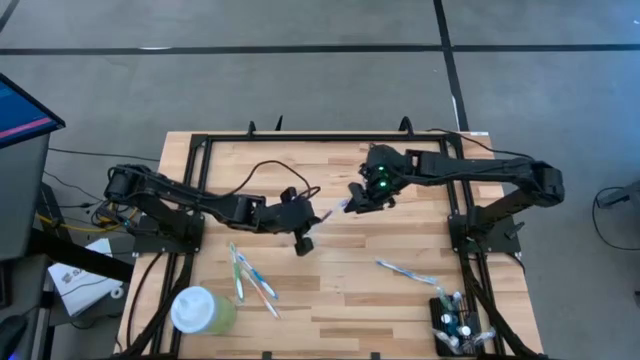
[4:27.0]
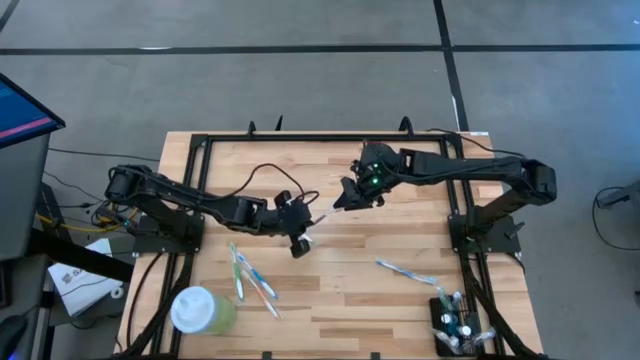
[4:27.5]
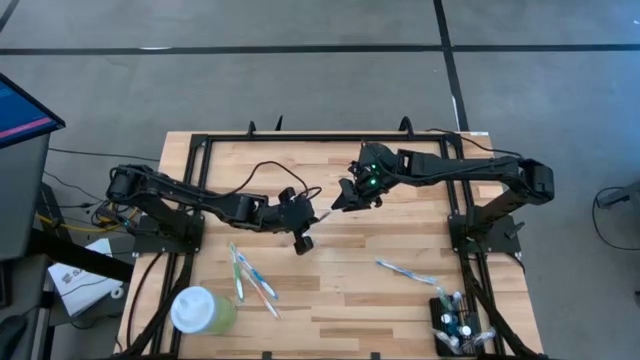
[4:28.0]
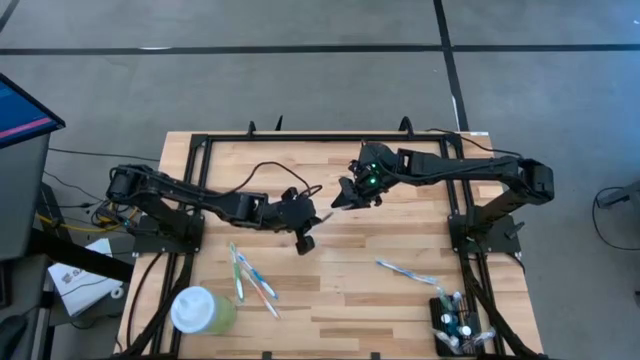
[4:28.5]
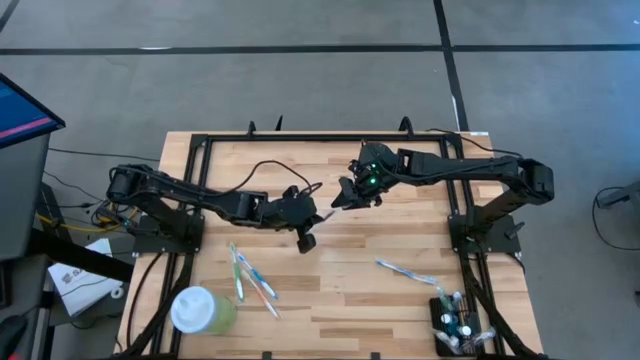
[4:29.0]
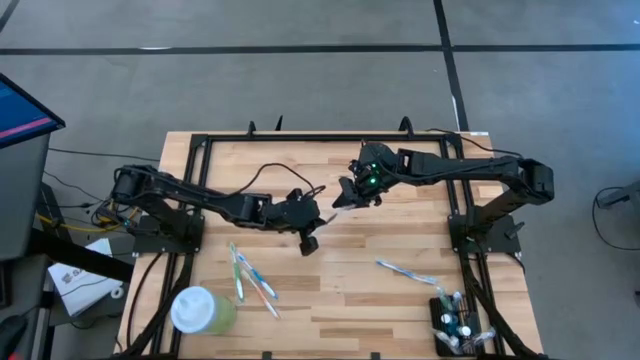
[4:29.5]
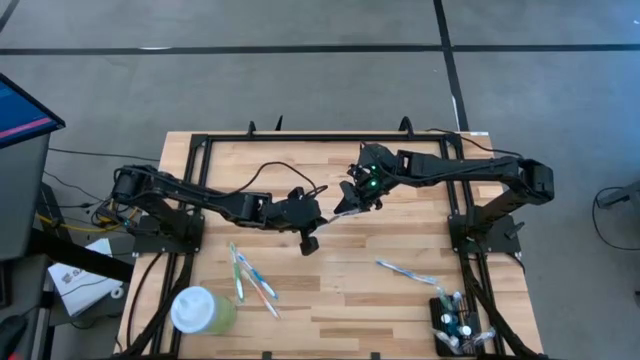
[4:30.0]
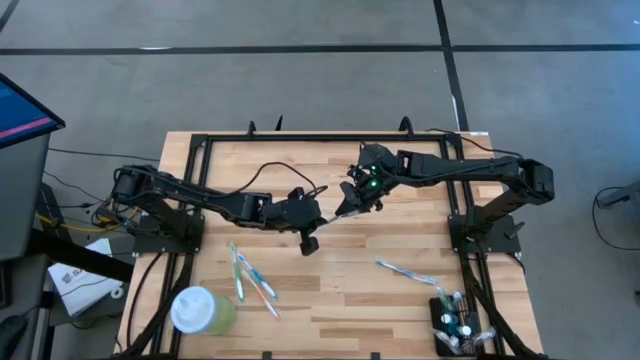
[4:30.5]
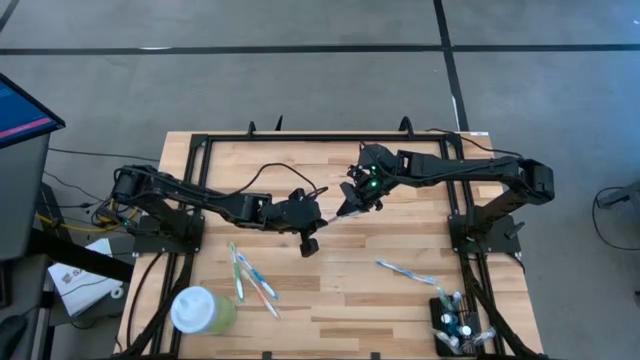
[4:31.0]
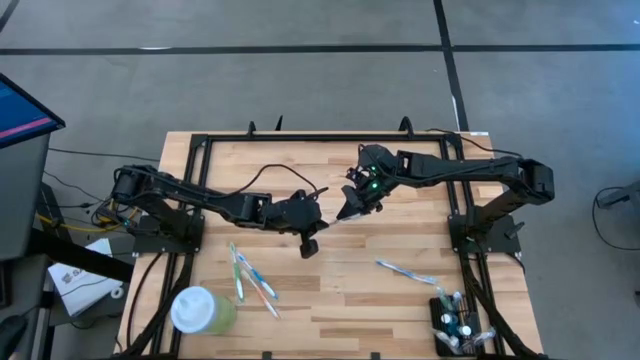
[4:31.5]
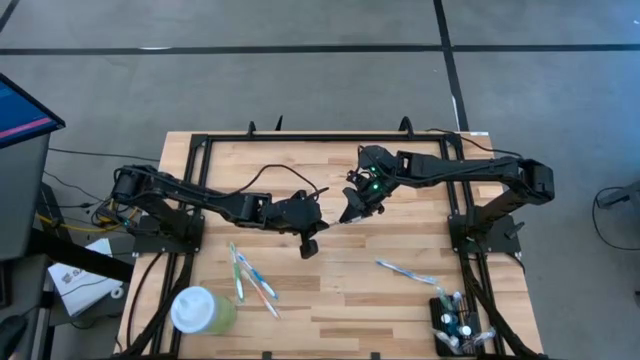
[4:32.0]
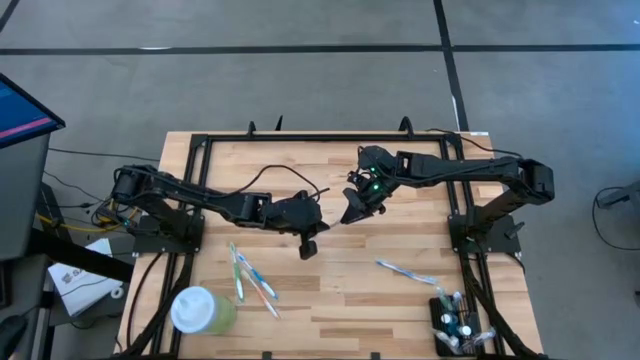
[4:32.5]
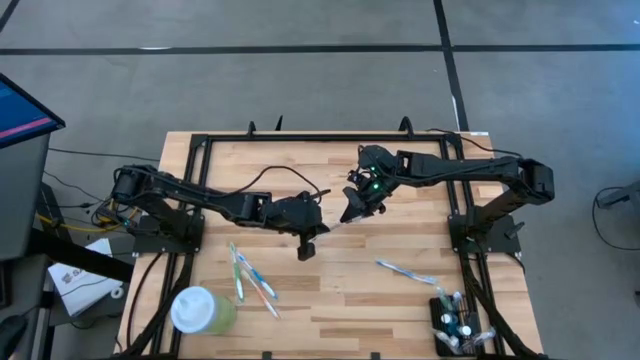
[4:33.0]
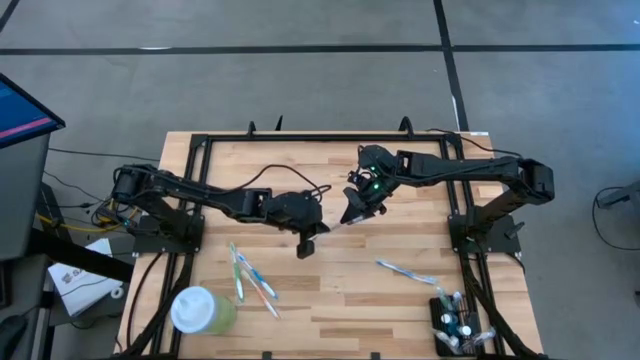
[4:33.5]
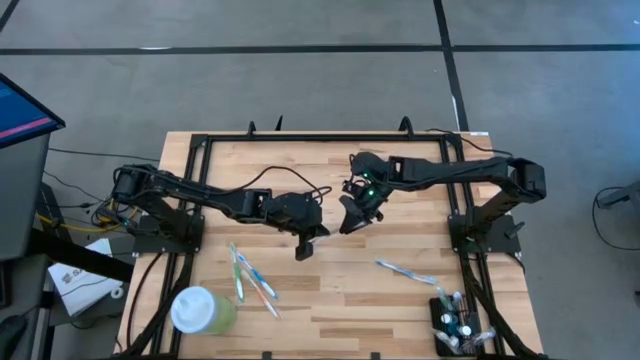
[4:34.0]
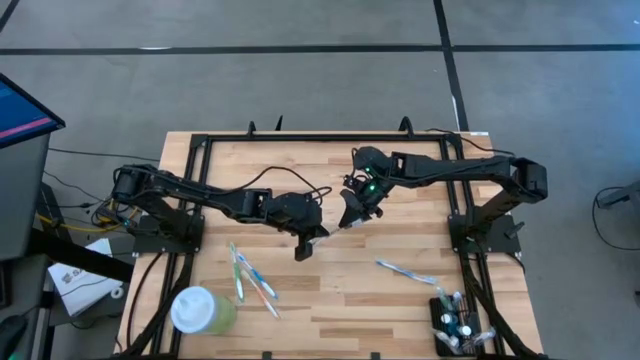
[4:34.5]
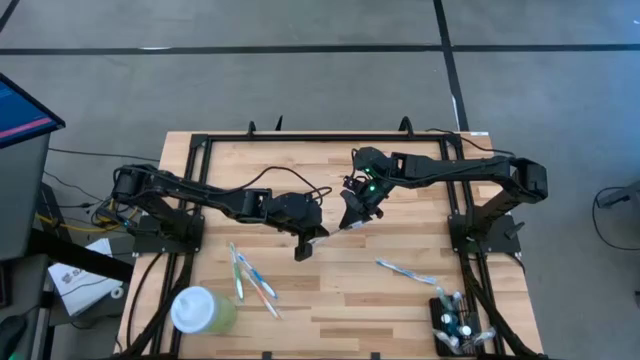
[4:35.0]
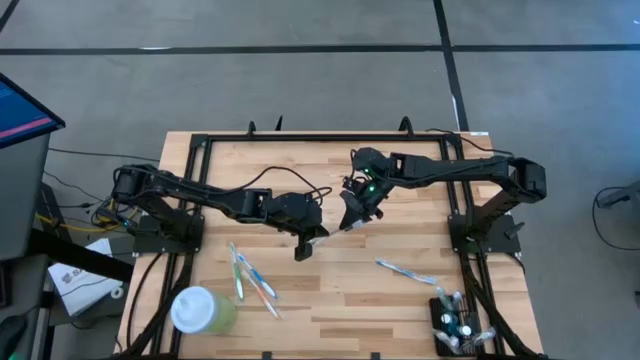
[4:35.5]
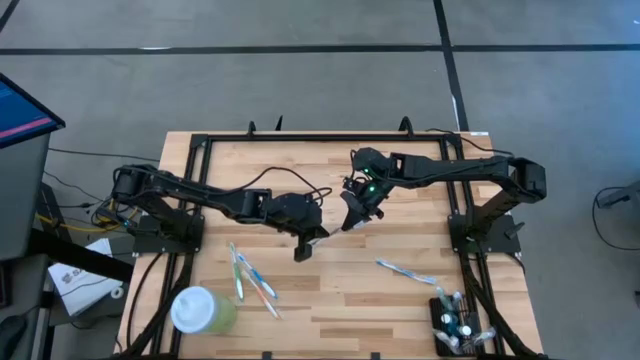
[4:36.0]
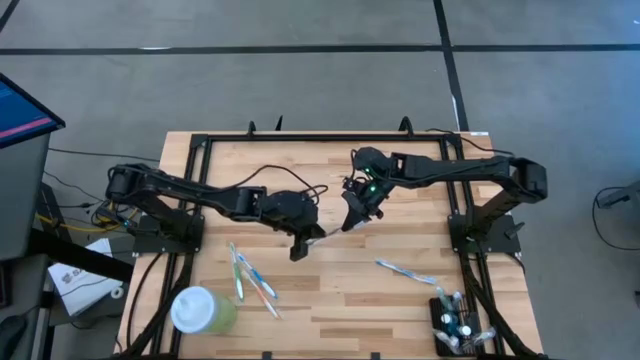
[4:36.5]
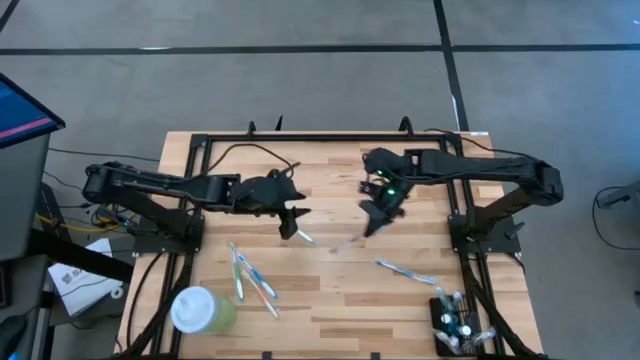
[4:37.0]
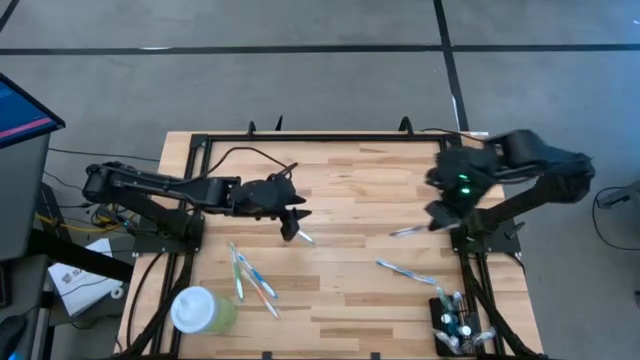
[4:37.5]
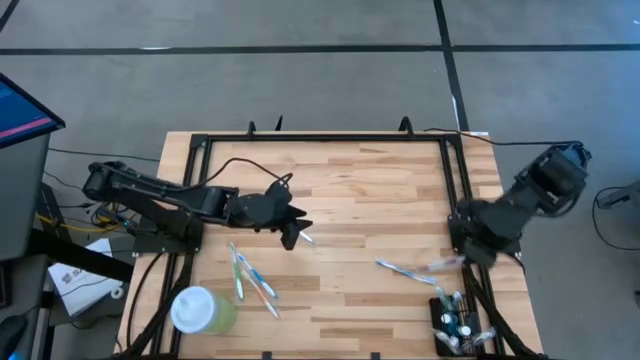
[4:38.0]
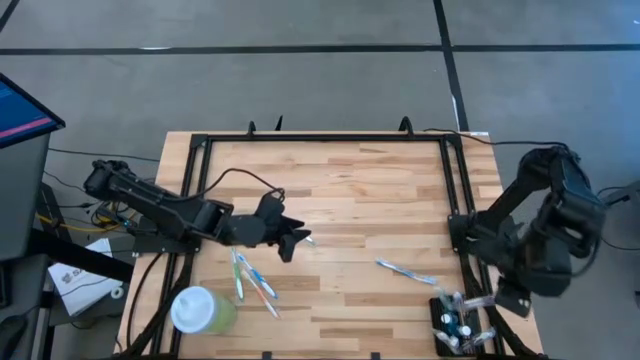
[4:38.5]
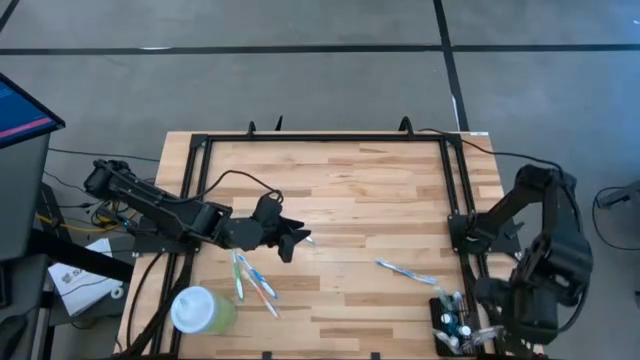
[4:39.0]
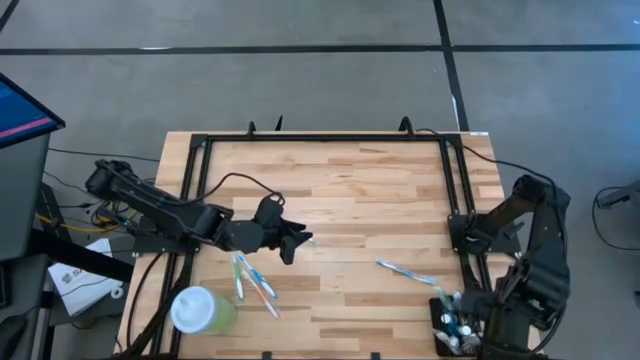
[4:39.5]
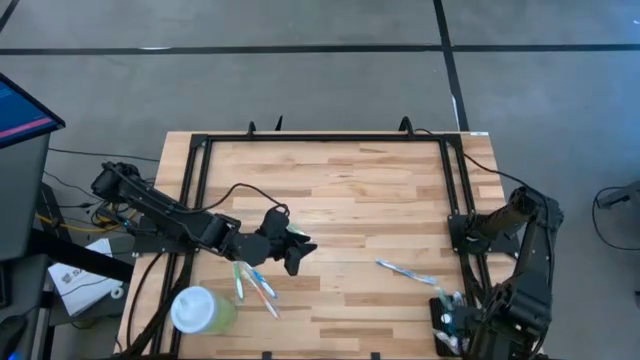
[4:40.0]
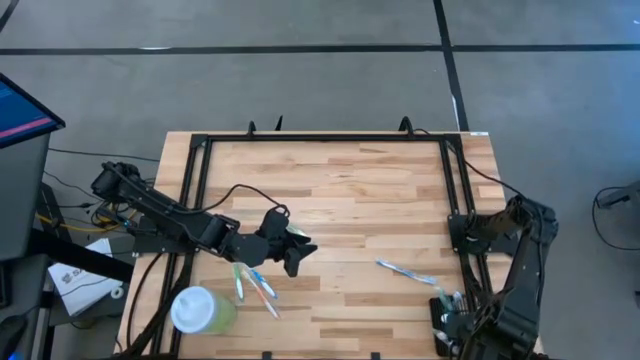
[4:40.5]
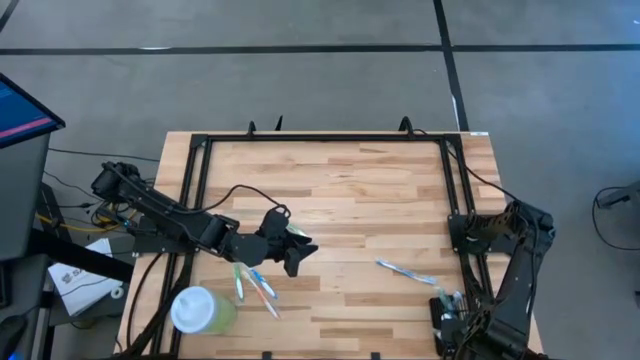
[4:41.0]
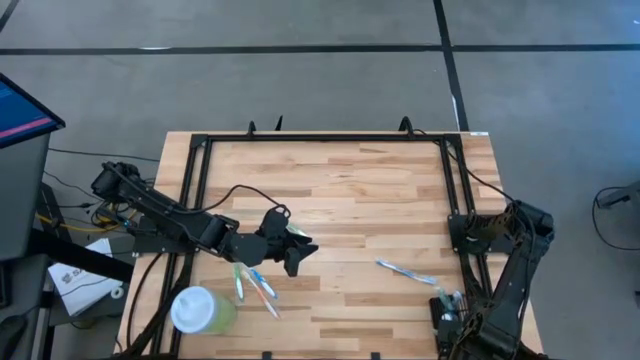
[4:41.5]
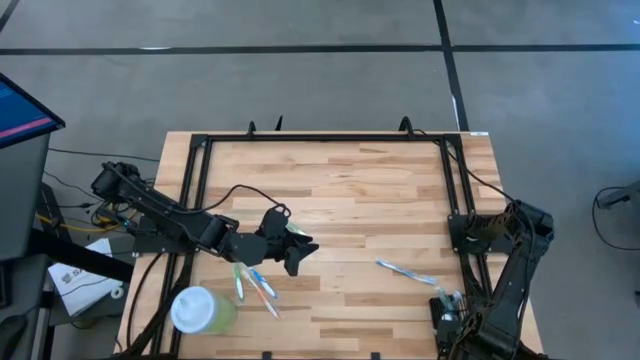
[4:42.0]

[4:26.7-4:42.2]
Task: Pick & Place toothbrushing station
Put the purple toothbrush into the black organizer

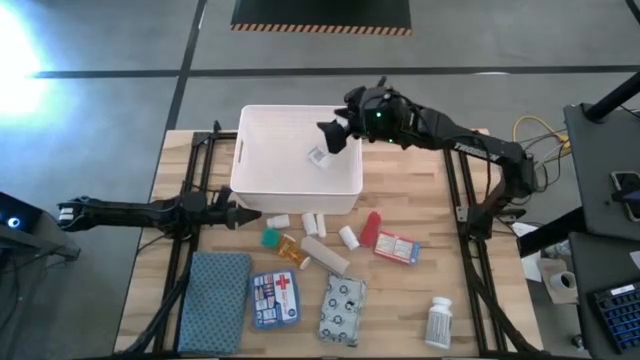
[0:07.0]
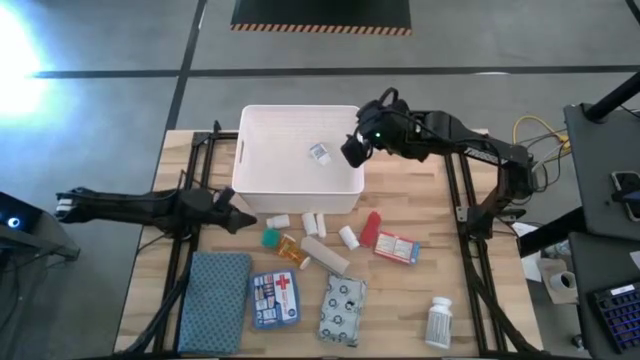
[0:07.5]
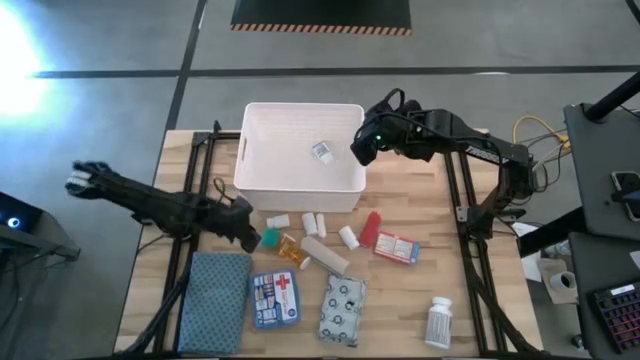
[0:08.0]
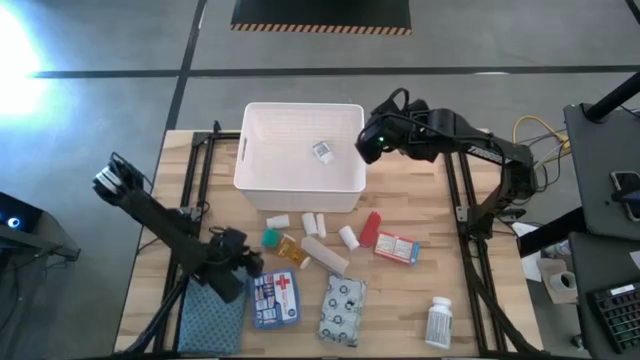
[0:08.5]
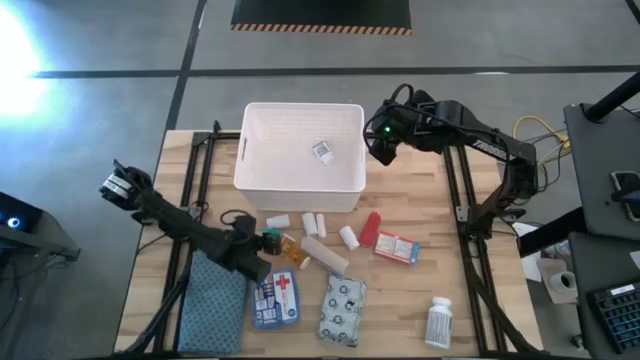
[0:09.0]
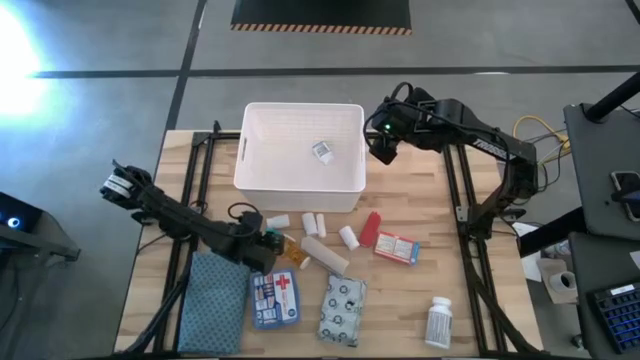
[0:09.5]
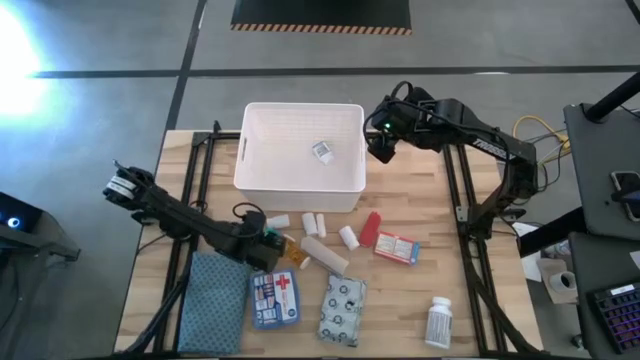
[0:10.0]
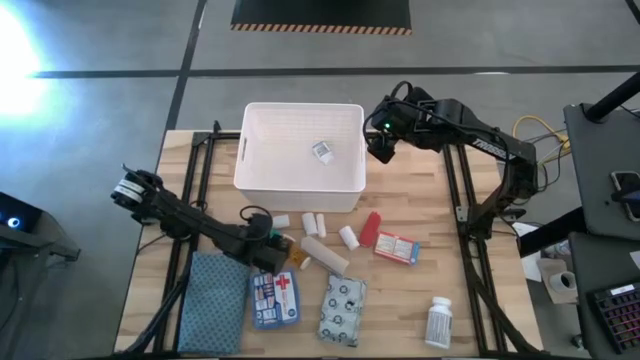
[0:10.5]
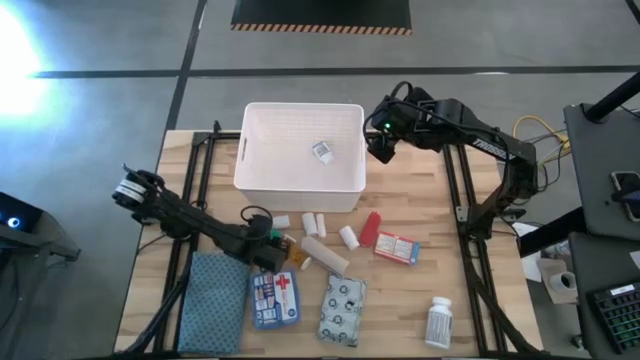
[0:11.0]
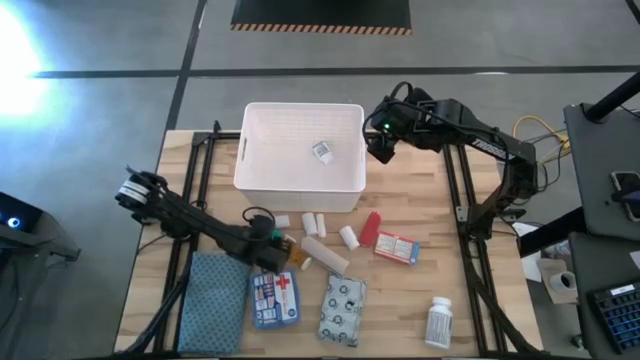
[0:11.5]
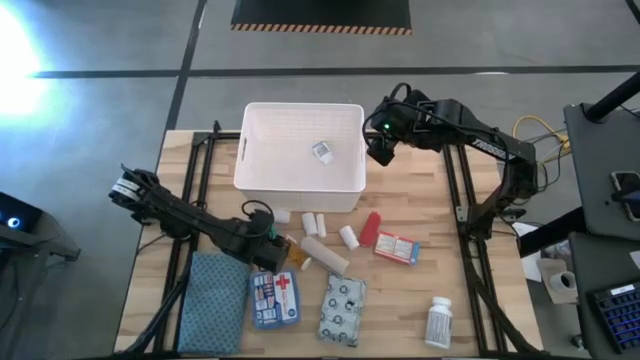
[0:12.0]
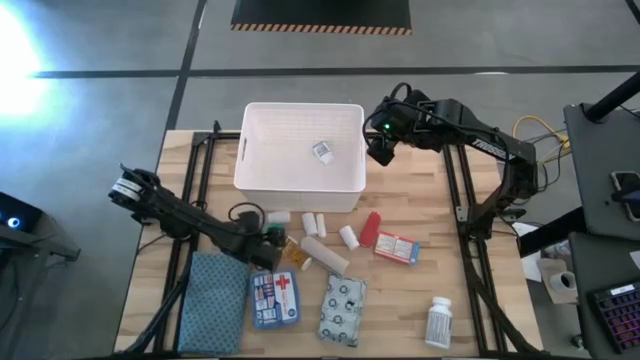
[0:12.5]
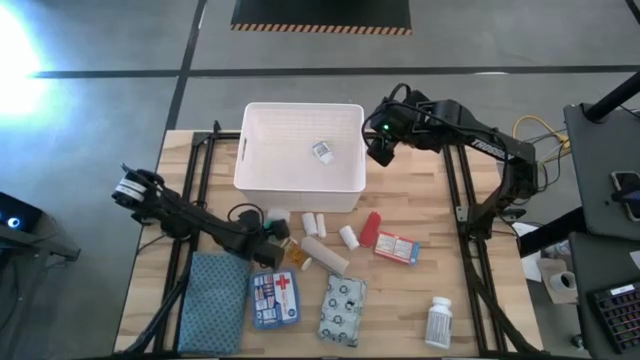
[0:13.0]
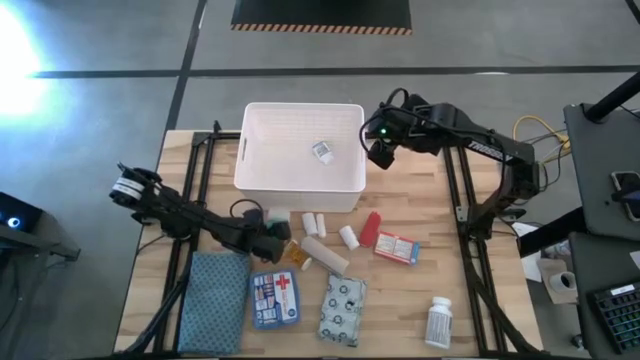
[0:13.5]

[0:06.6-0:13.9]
Task: Pick & place medical supplies in basket/bin
Put the green bandage into the white bin
